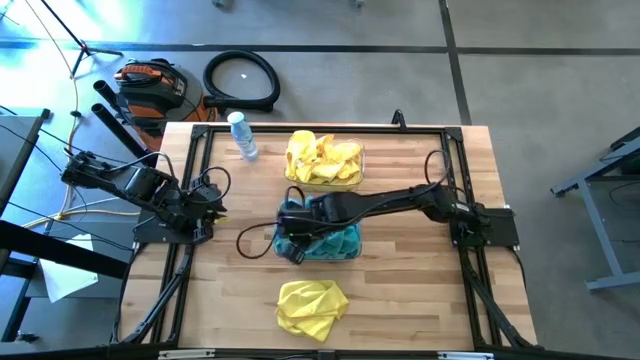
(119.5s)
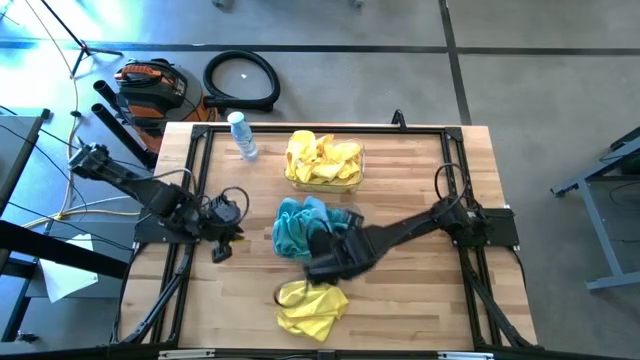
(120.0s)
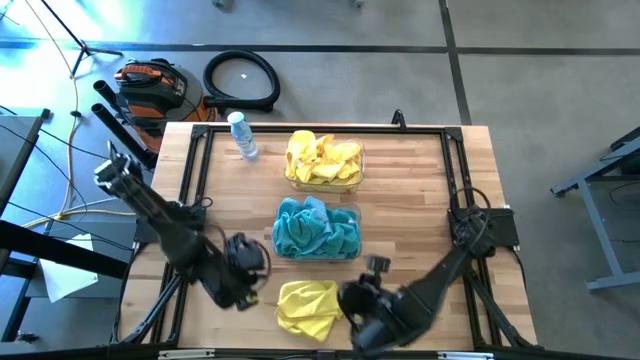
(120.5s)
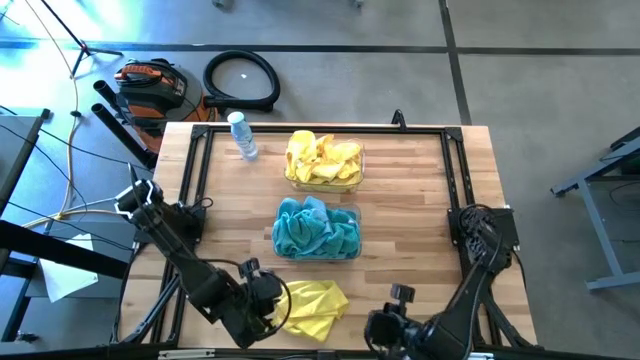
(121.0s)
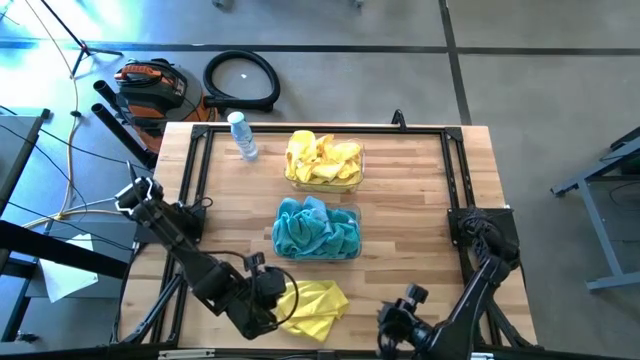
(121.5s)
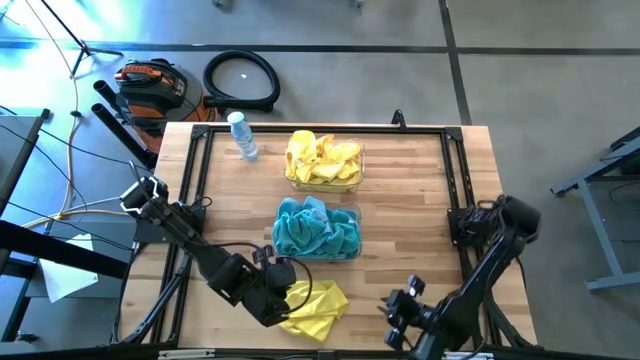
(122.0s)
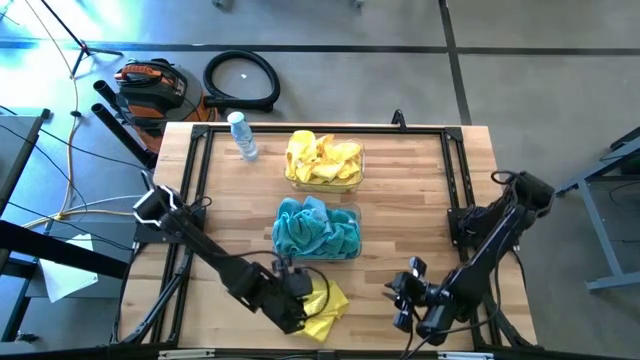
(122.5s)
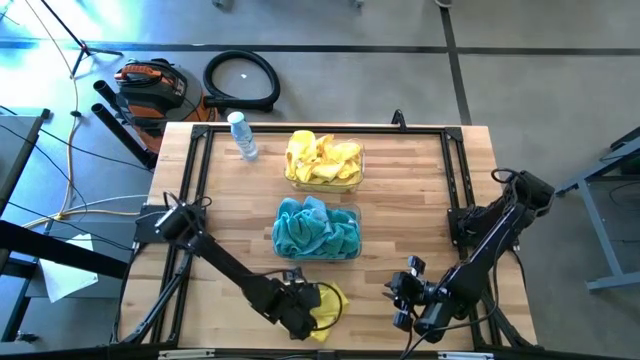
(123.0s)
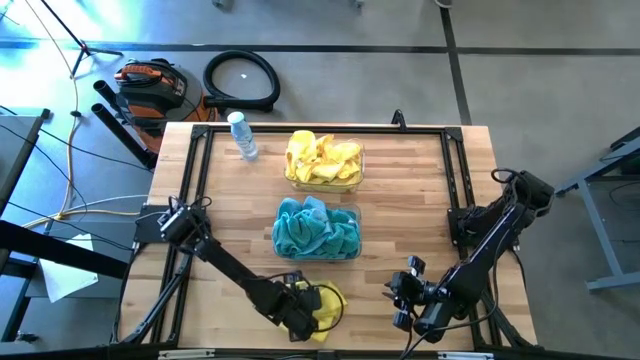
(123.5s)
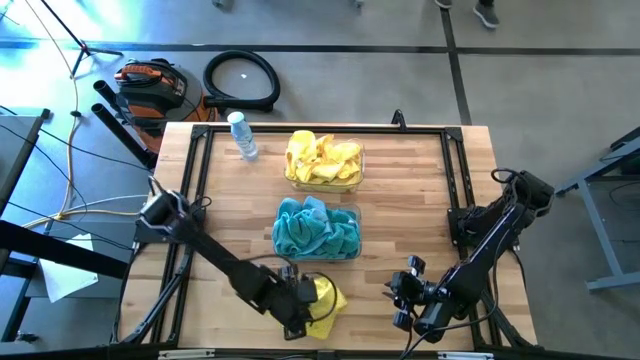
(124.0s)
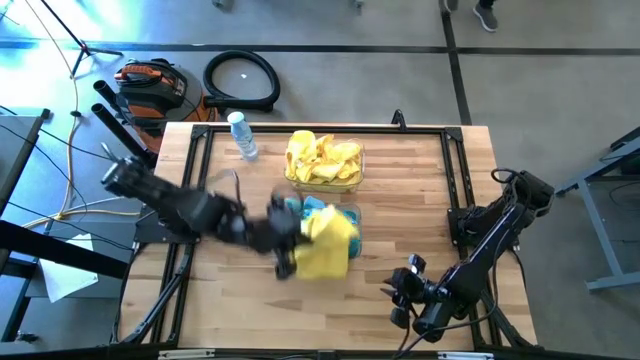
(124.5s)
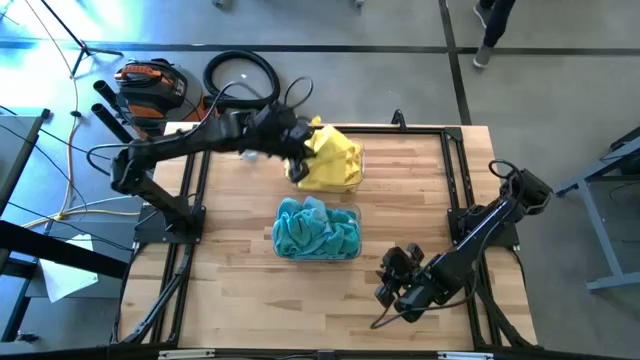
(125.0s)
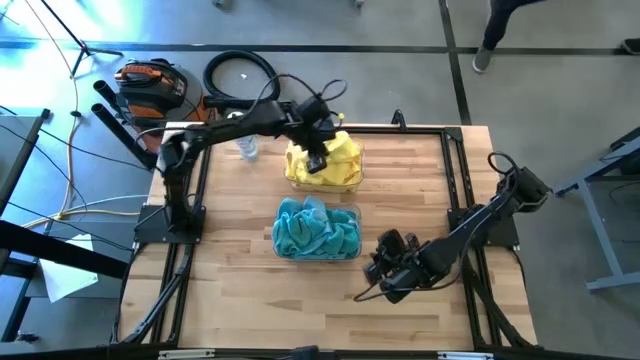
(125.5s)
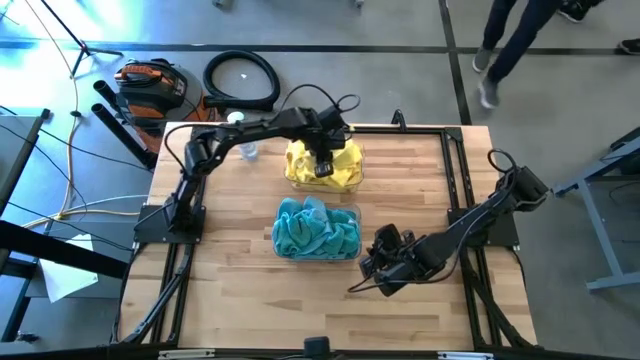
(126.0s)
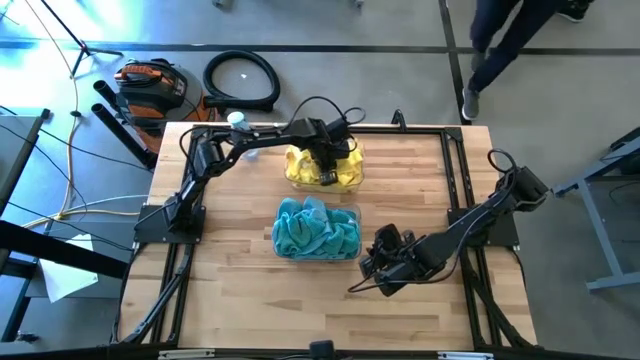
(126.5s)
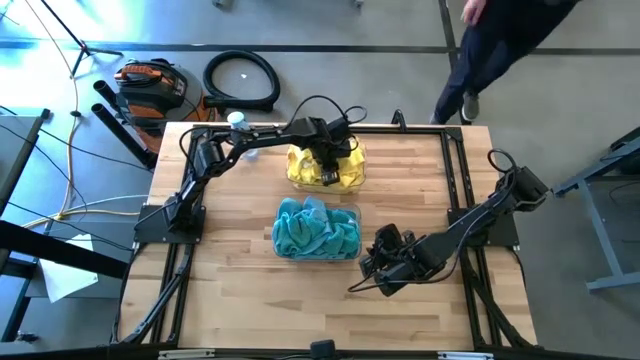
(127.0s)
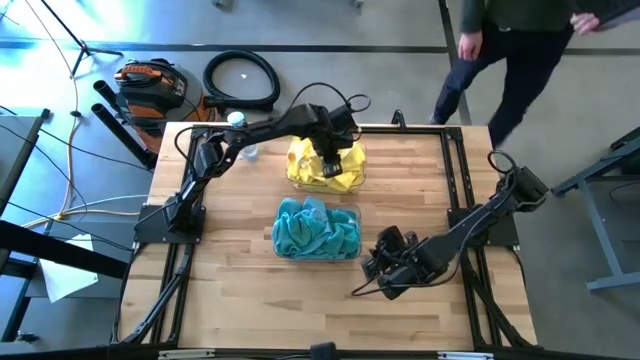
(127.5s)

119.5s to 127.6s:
Task: Sort microfiber towel by color & place in baskets
Put the yellow microfiber cloth into the top transparent bin

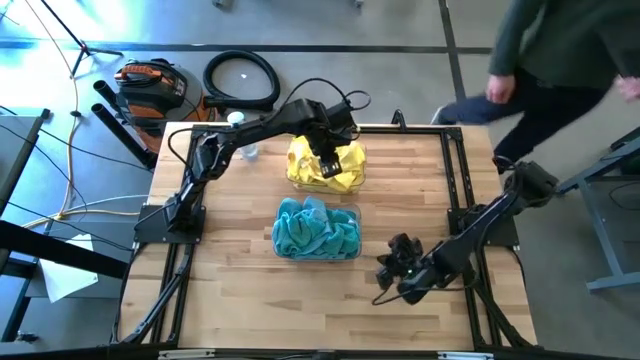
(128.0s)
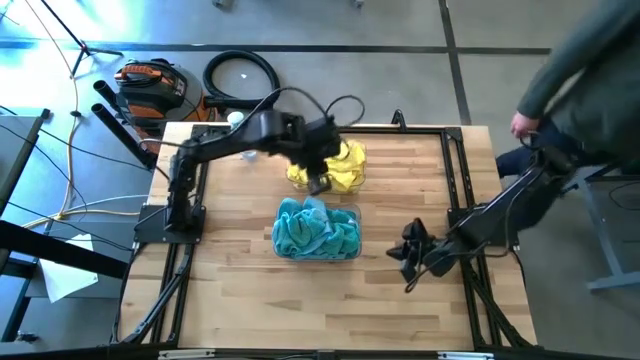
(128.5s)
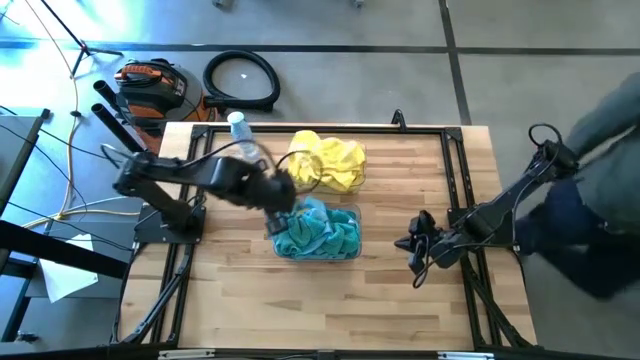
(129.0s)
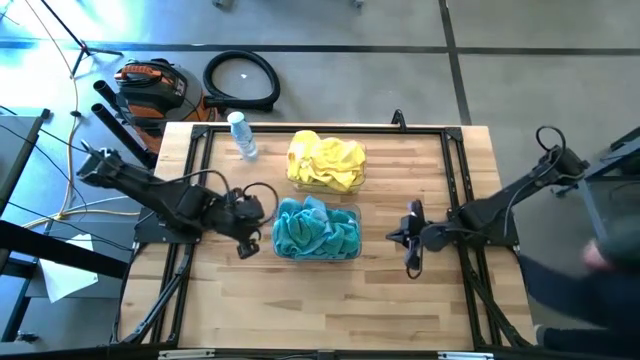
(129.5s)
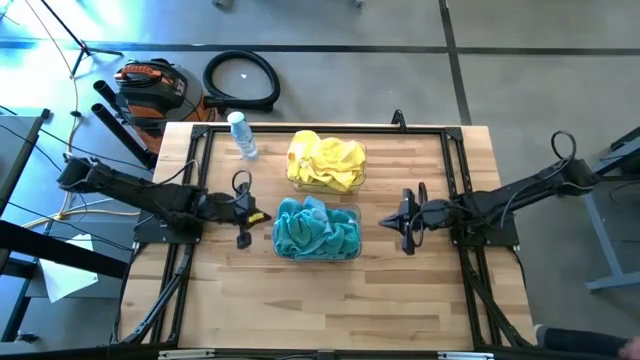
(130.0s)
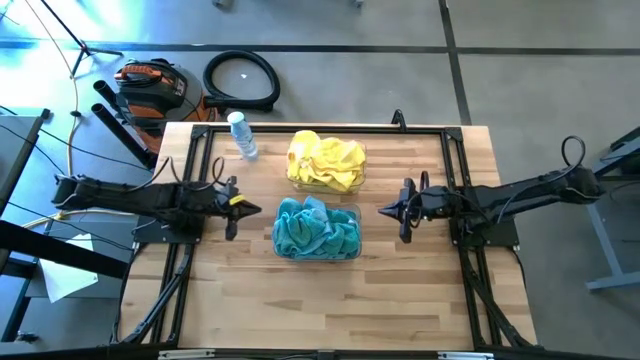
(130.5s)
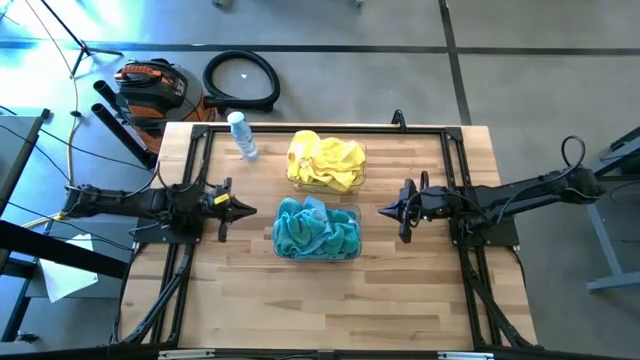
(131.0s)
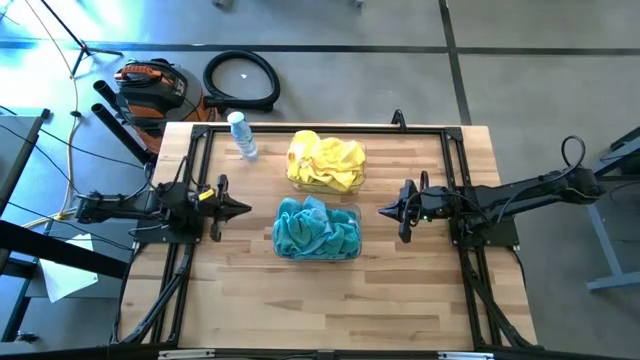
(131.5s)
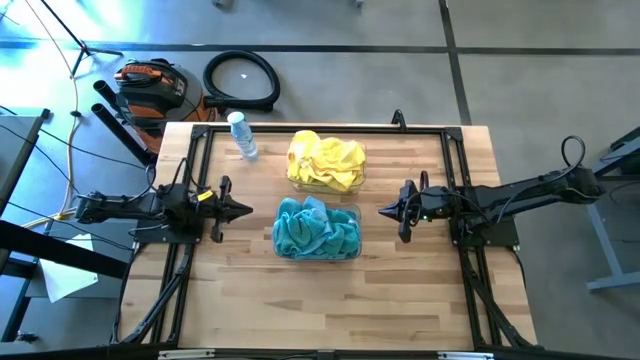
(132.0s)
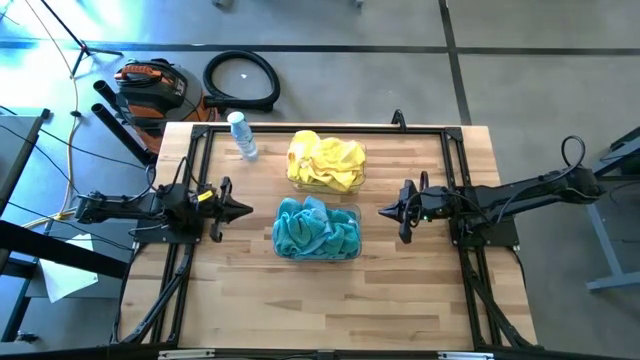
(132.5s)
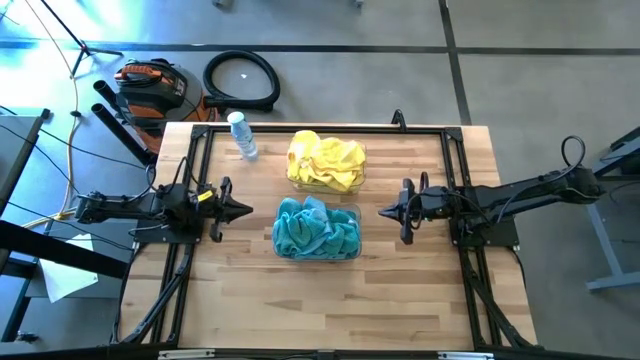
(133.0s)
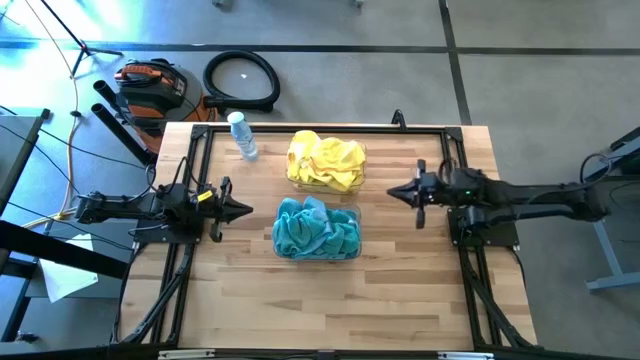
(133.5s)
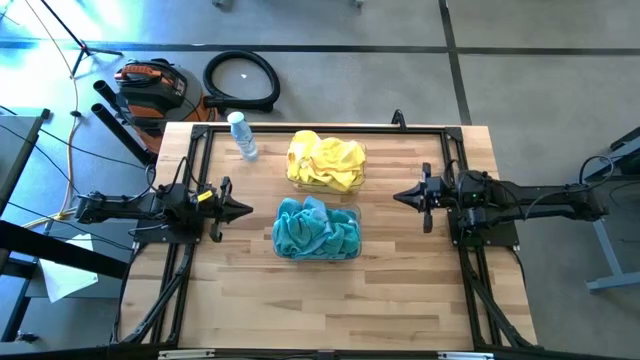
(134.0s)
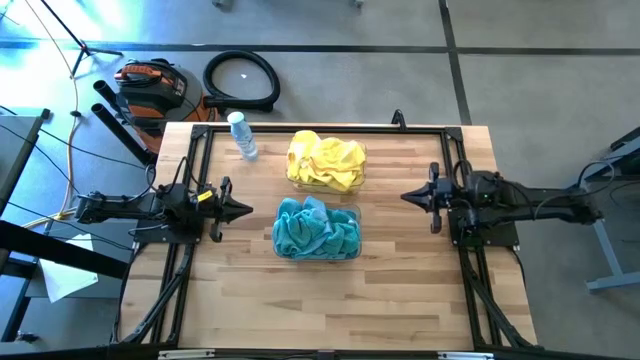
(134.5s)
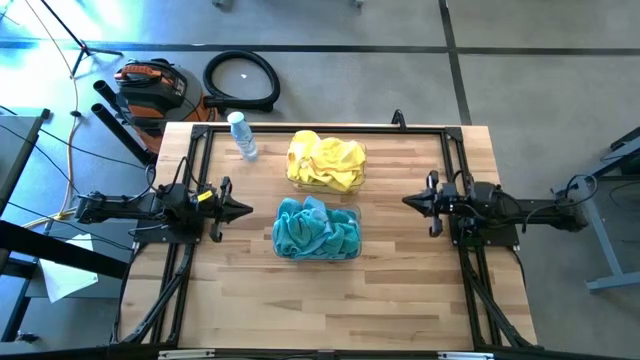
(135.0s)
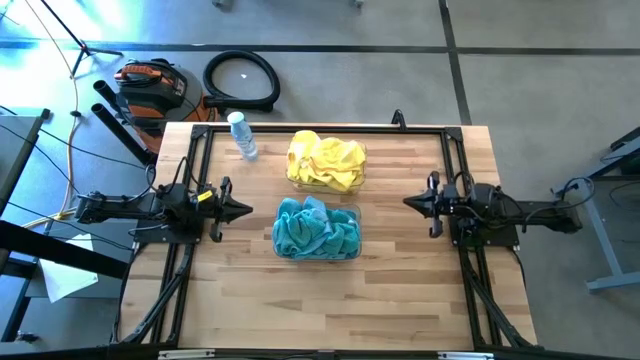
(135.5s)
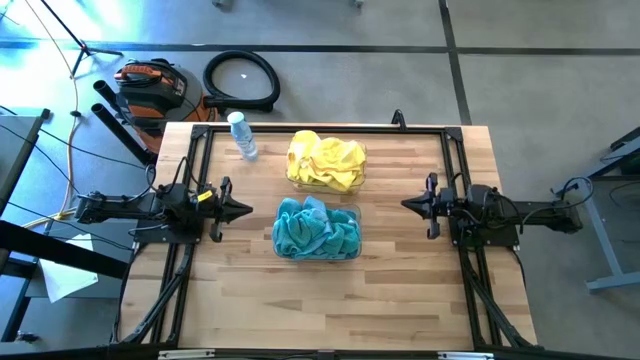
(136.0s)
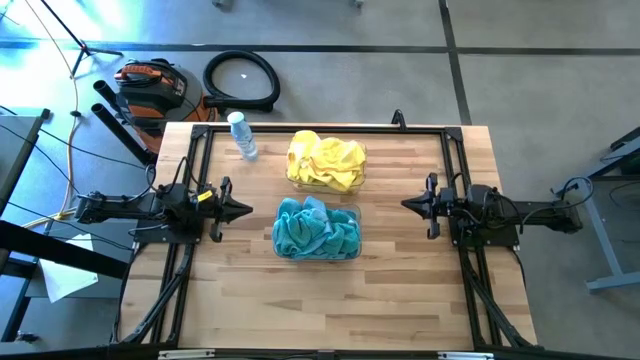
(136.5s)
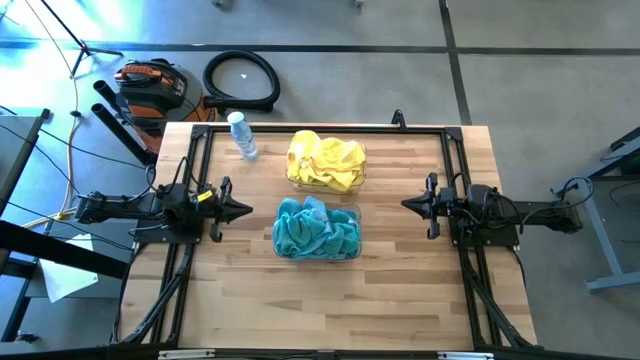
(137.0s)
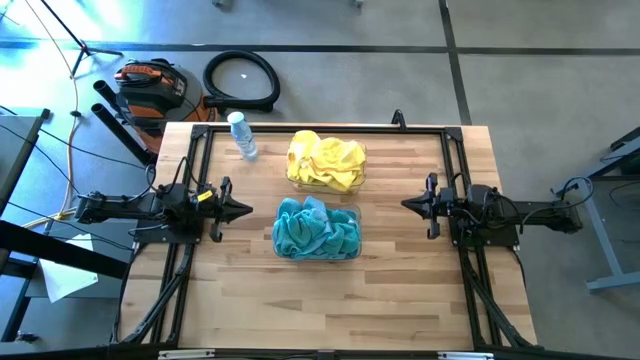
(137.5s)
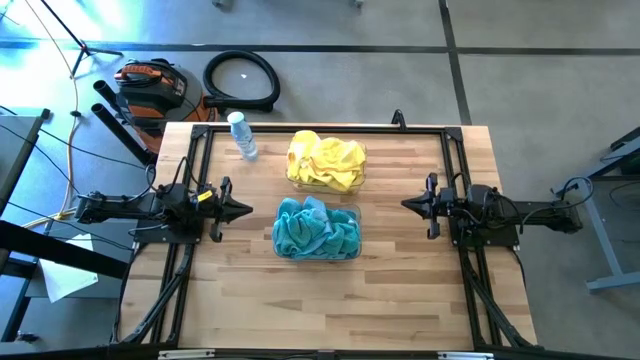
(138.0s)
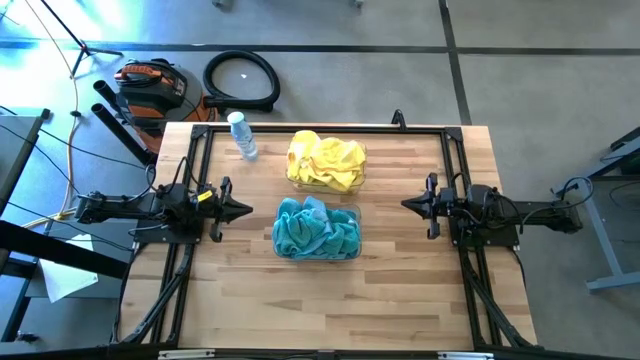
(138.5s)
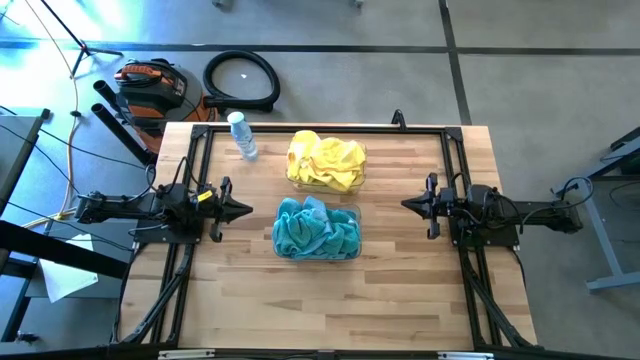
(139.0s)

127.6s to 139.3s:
Return to Home Position
